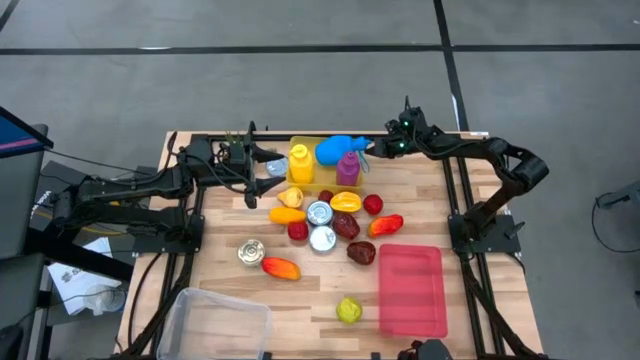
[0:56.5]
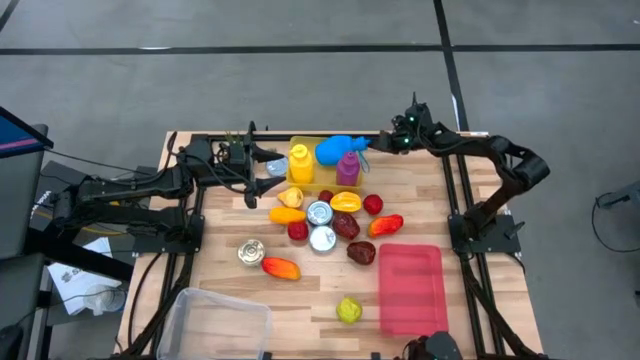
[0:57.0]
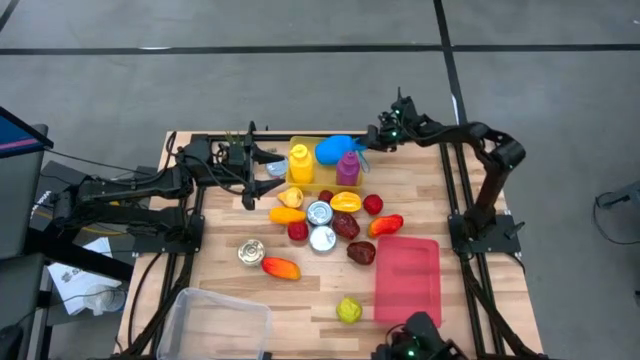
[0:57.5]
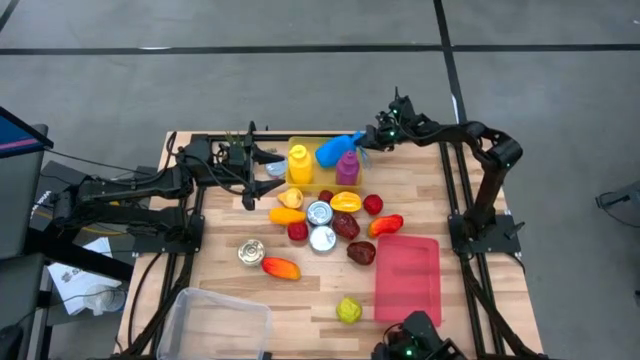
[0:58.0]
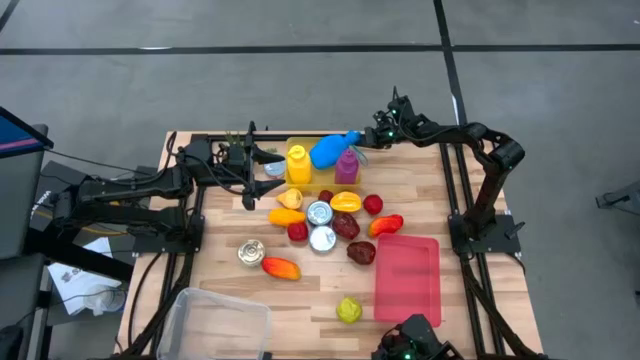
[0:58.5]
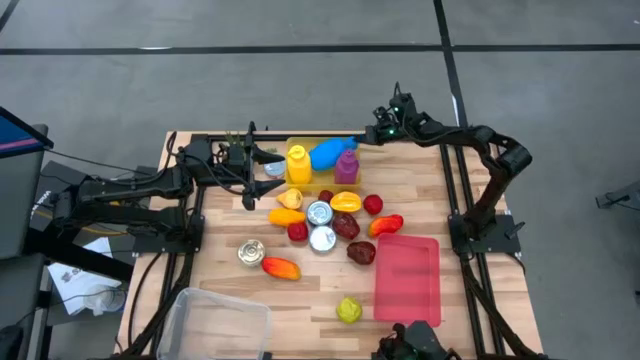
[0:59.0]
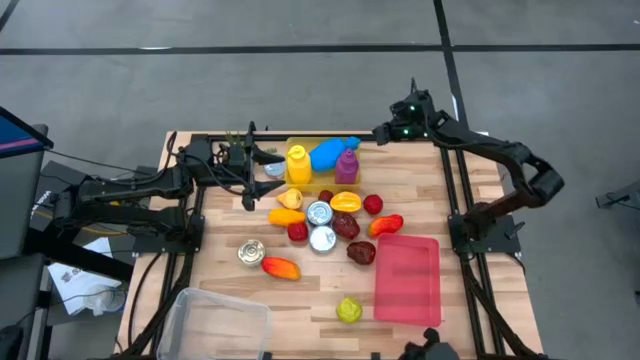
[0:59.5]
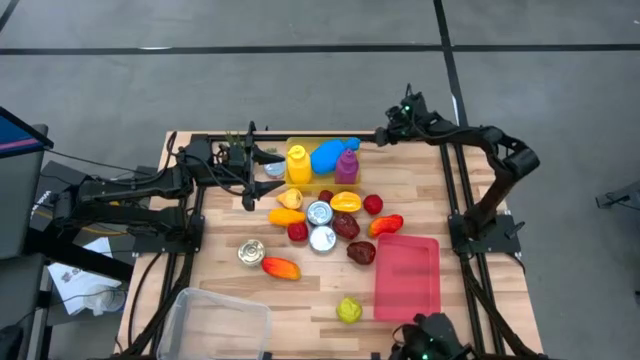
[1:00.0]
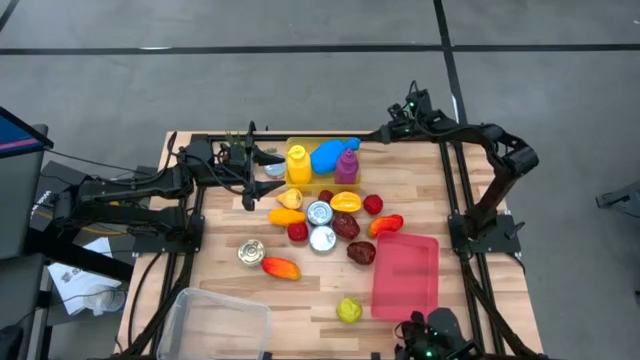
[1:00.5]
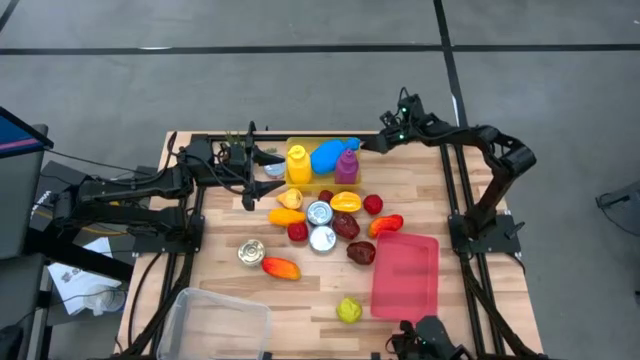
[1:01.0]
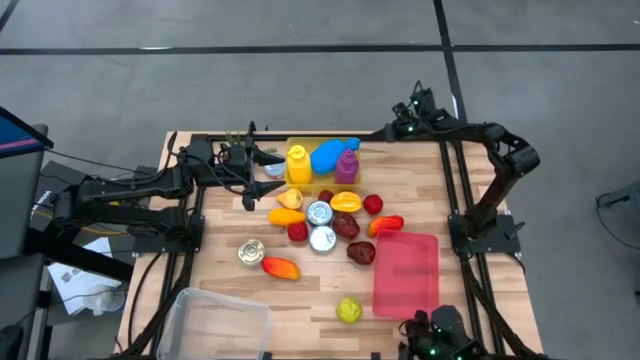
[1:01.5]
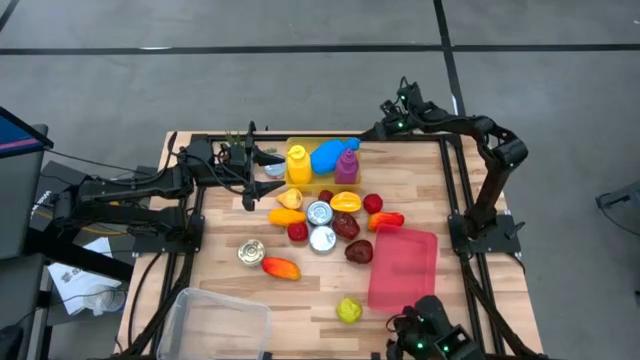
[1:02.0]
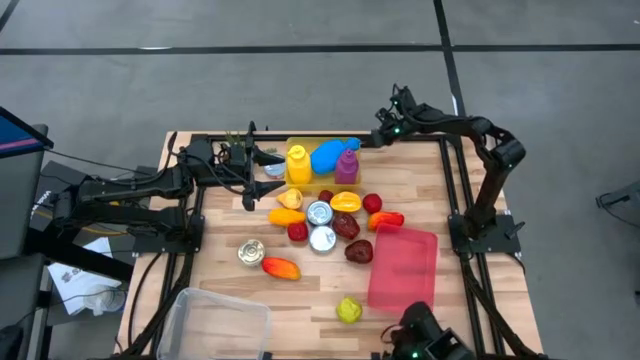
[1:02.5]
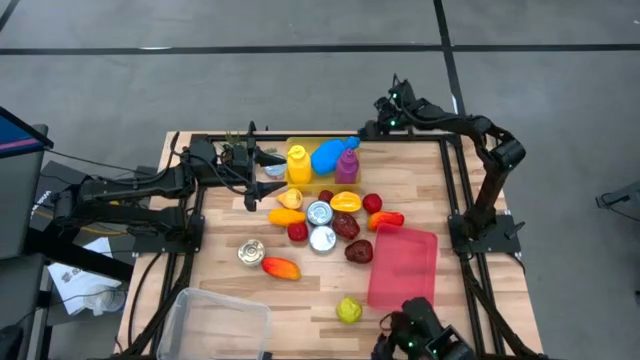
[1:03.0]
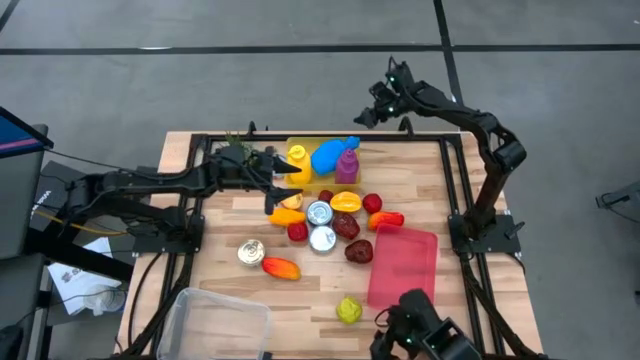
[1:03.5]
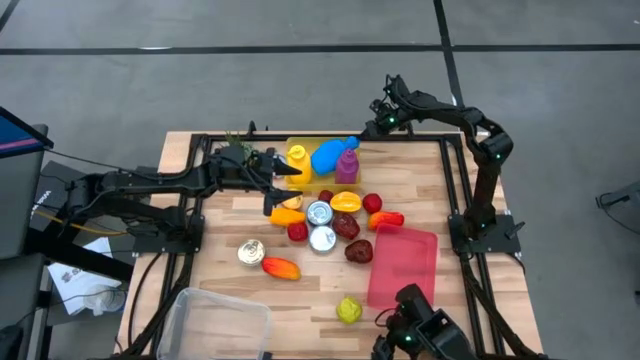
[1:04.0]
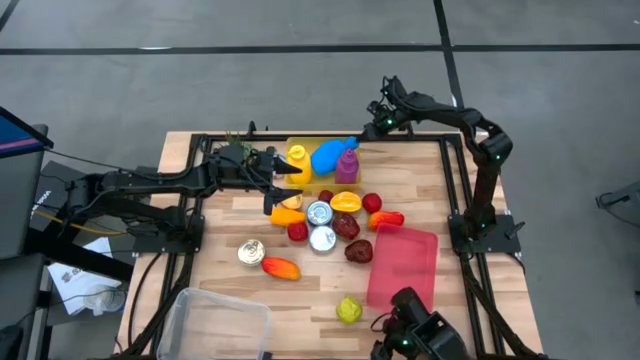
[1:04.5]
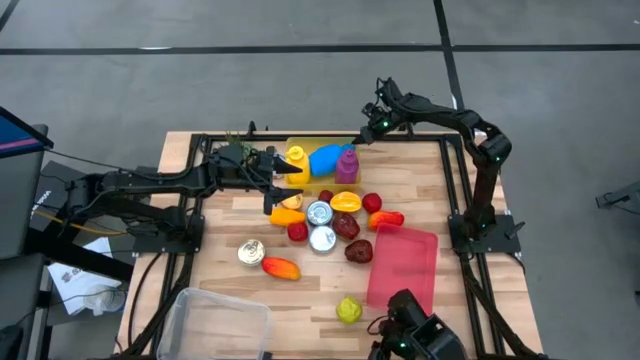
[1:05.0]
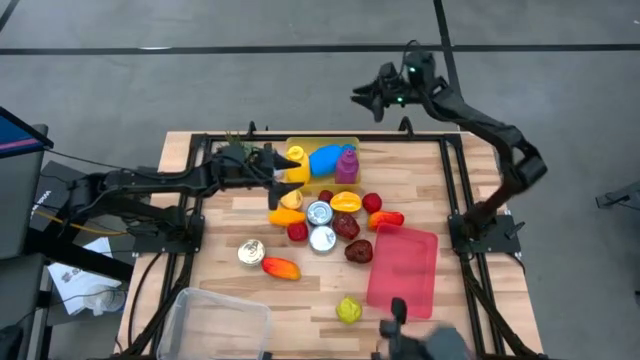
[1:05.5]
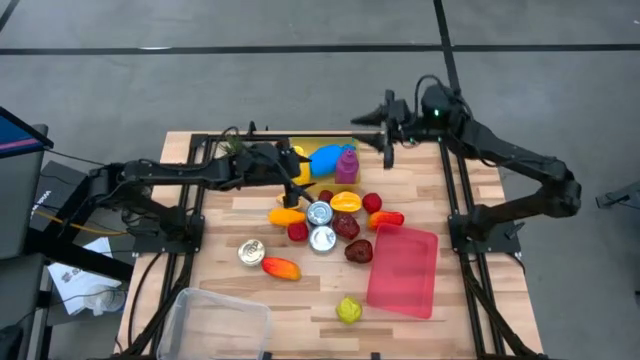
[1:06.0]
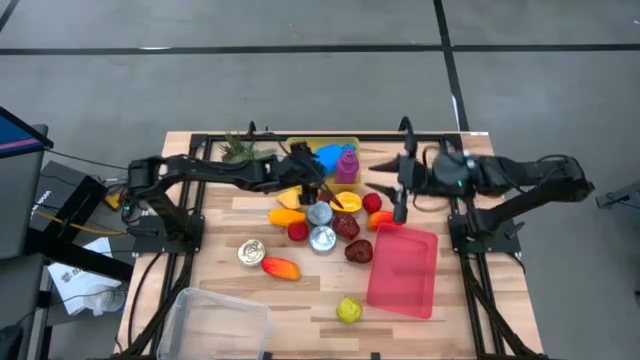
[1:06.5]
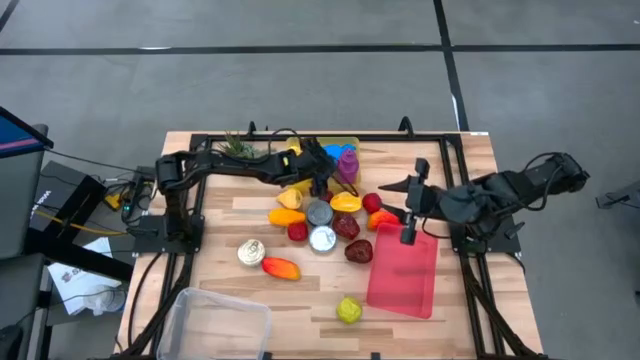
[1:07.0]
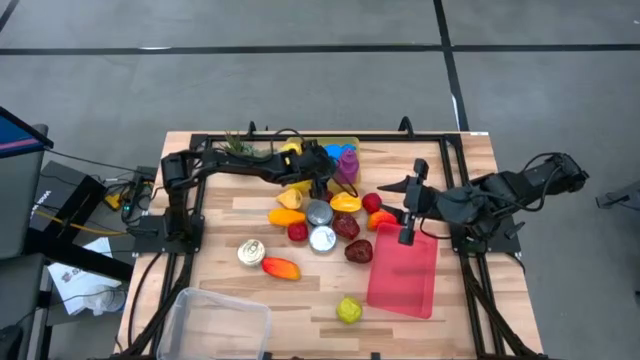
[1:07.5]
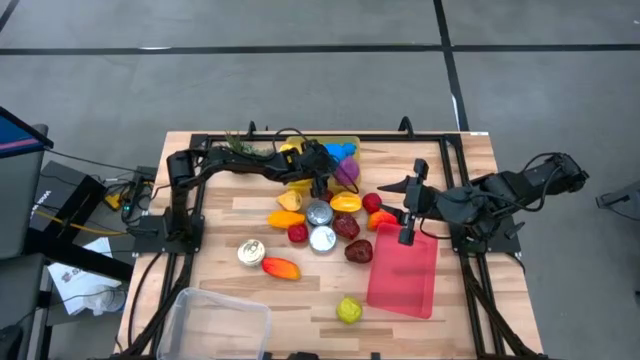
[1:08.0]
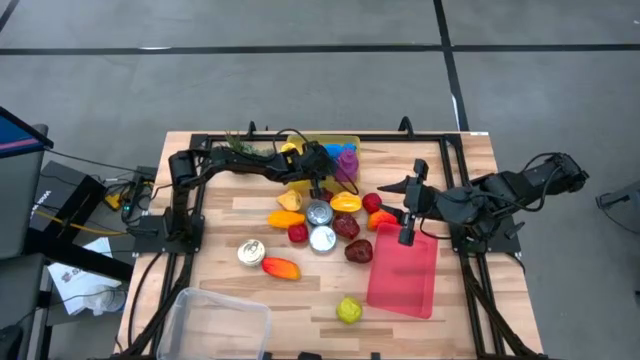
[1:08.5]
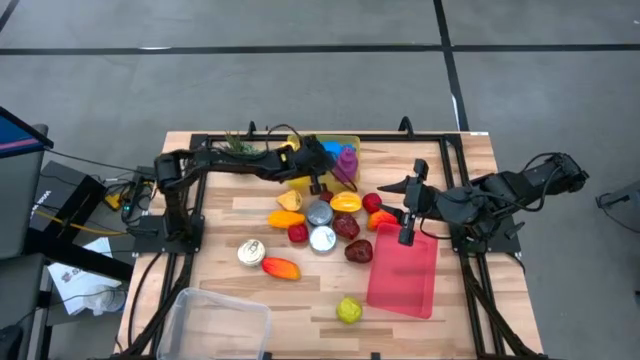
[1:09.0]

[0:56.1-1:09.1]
Task: Pick & Place Food Item
Adjust the blue tumbler in the yellow bin

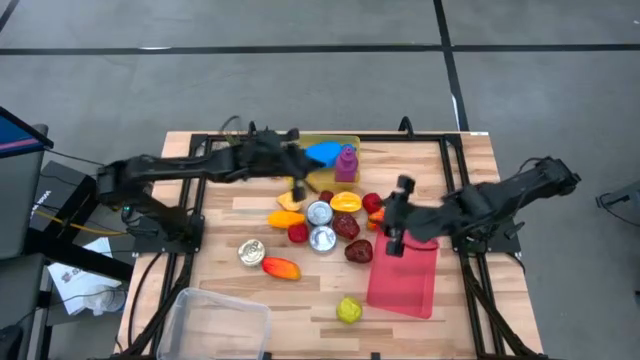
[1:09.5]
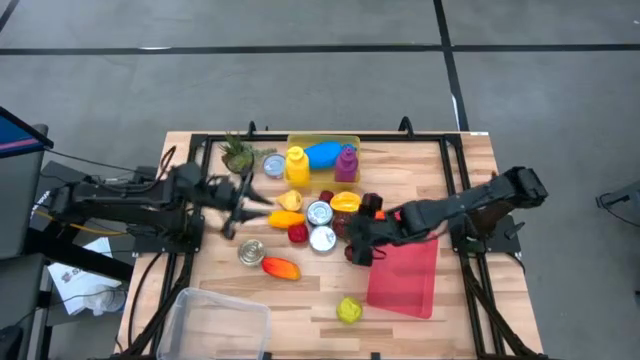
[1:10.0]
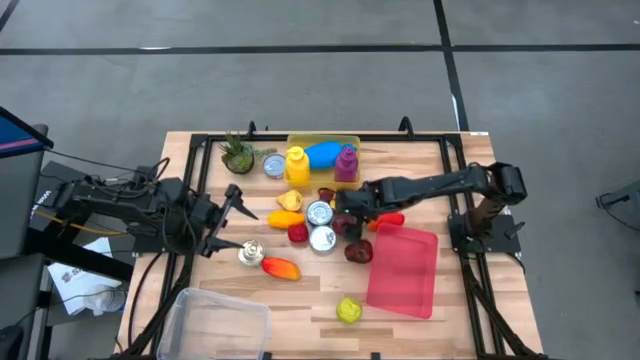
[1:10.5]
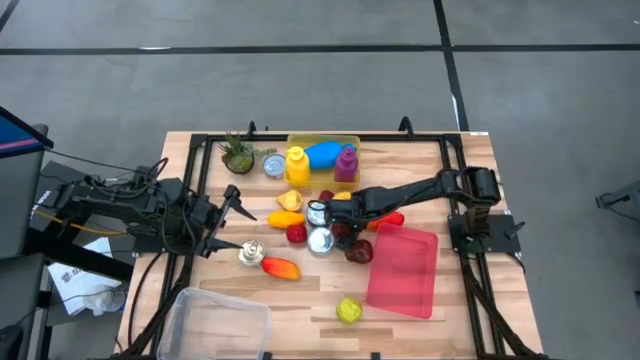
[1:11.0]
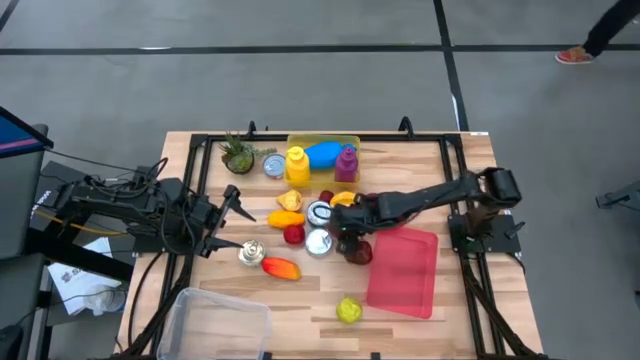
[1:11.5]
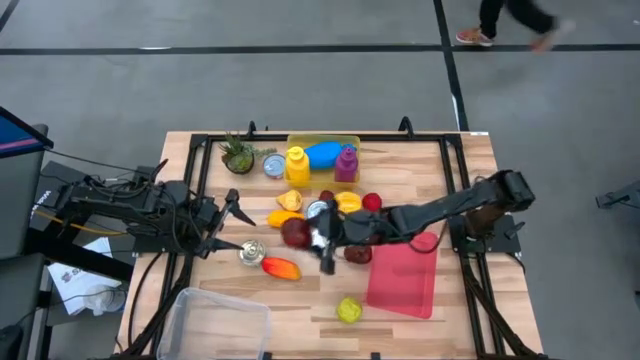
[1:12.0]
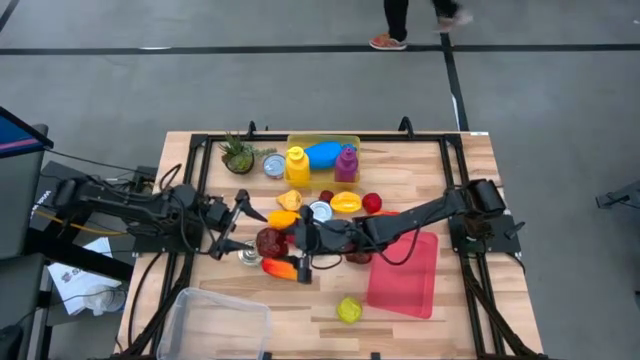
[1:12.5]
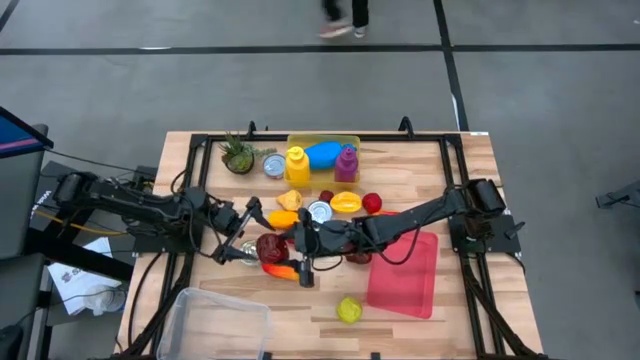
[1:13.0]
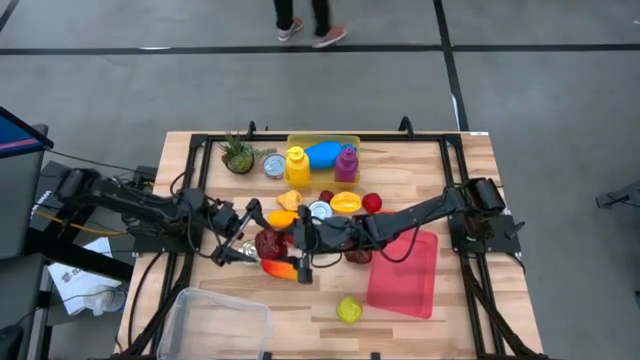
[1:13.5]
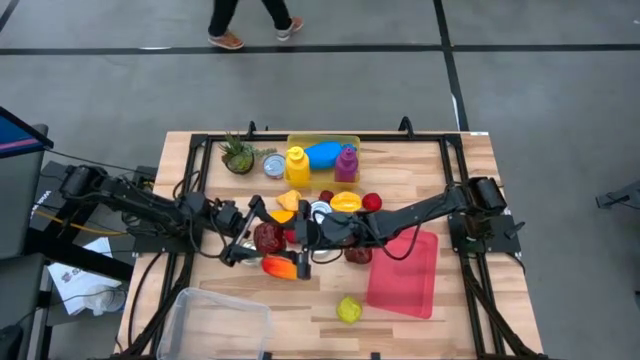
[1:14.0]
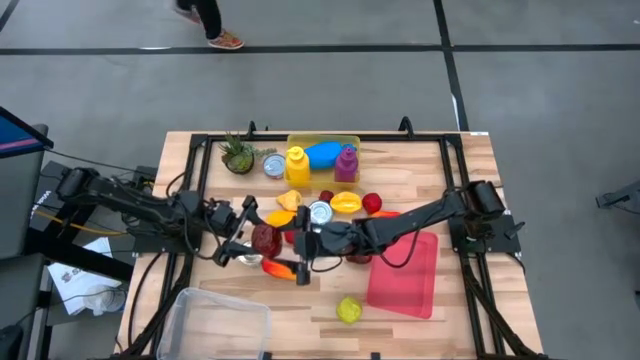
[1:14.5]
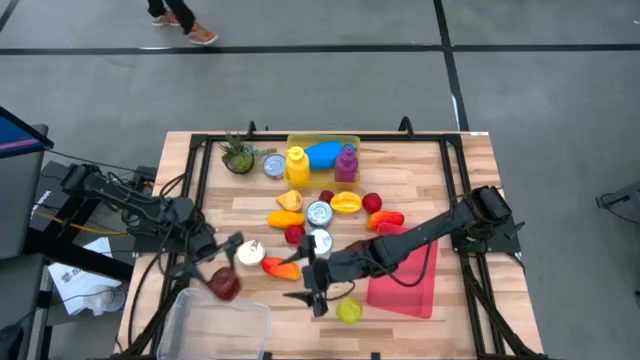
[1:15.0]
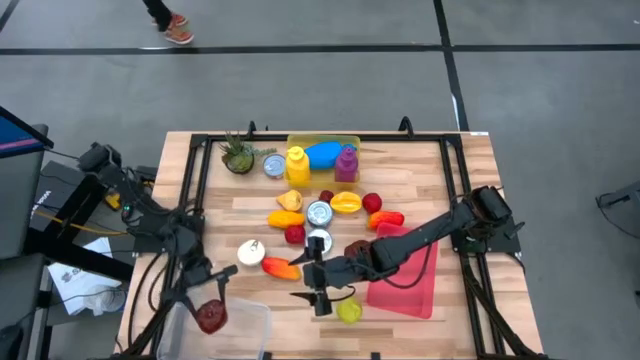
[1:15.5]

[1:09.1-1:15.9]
Put the top red apple into the white bin

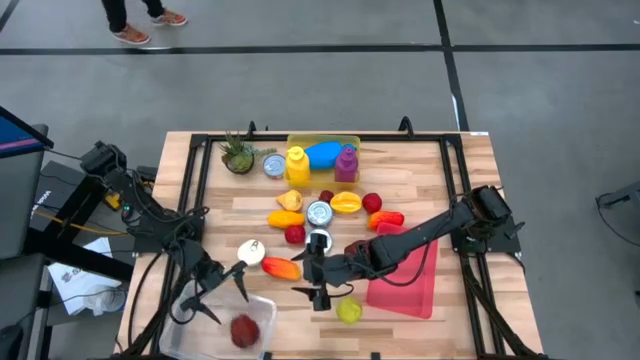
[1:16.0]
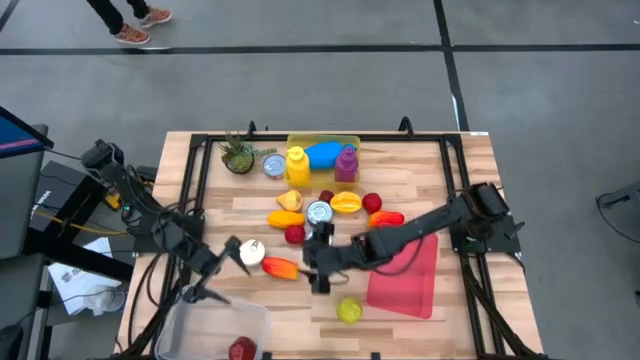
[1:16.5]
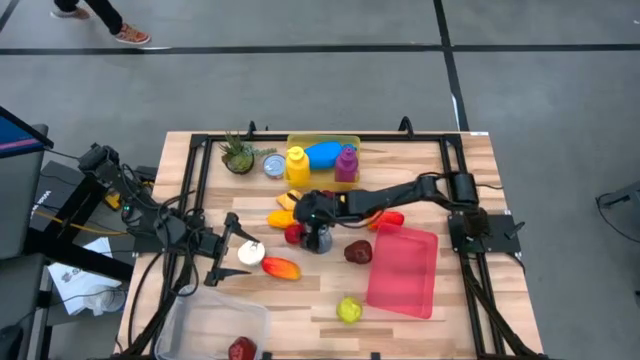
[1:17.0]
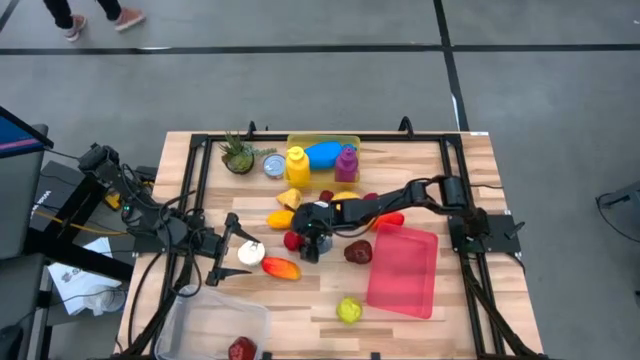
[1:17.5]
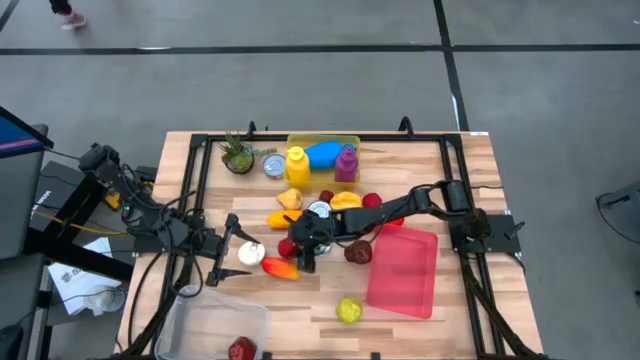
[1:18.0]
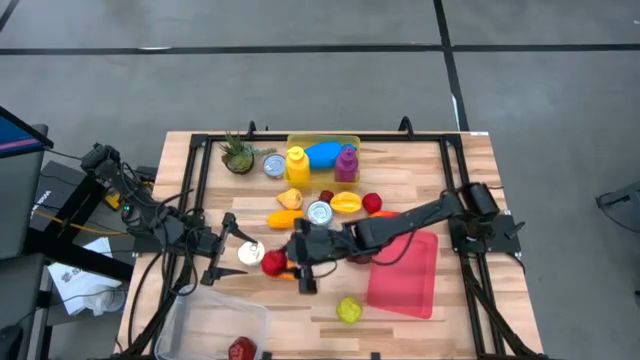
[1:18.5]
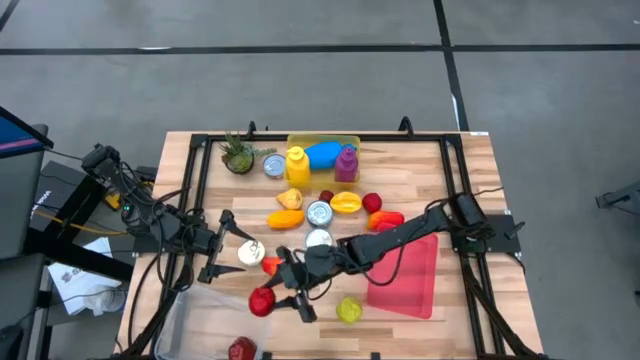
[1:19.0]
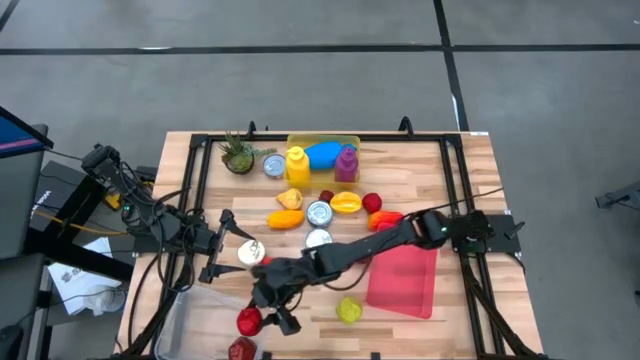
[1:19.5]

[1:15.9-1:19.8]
Put the bottom red tomato into the white bin
